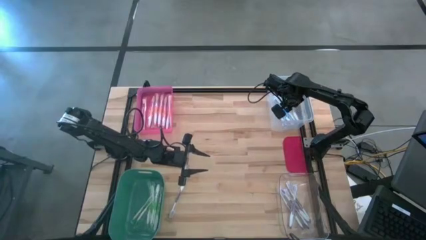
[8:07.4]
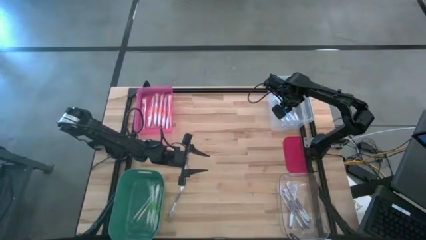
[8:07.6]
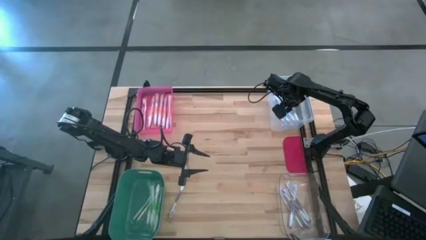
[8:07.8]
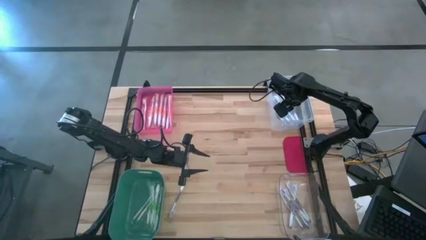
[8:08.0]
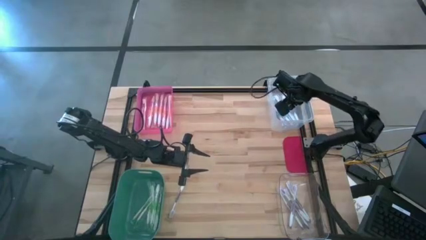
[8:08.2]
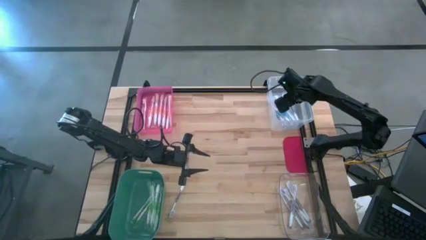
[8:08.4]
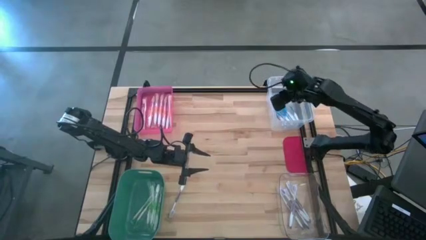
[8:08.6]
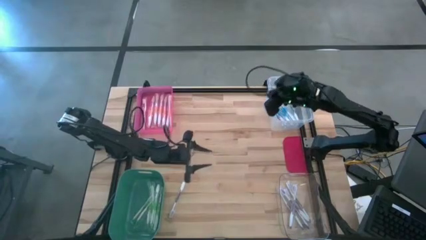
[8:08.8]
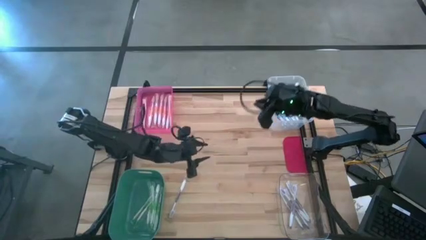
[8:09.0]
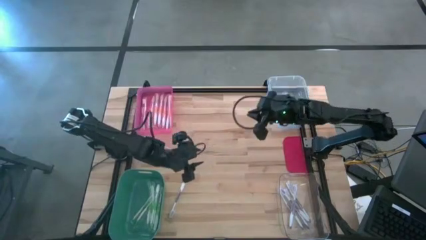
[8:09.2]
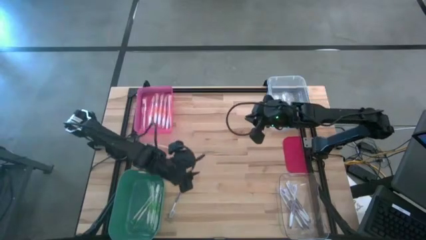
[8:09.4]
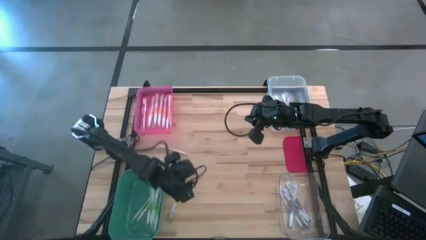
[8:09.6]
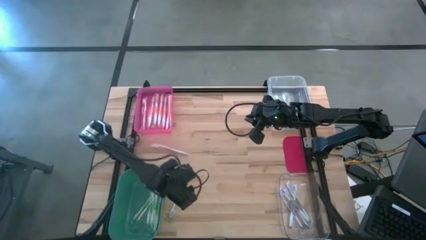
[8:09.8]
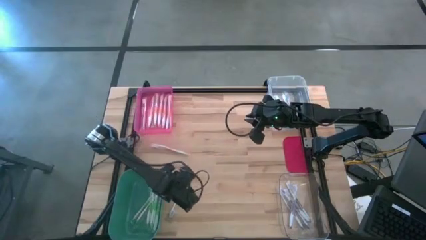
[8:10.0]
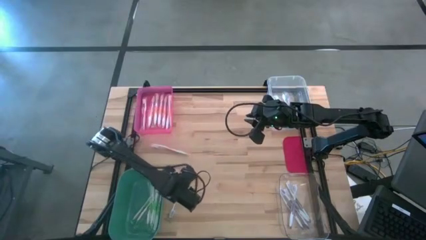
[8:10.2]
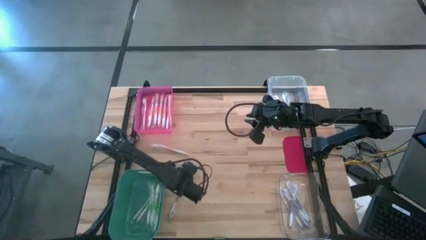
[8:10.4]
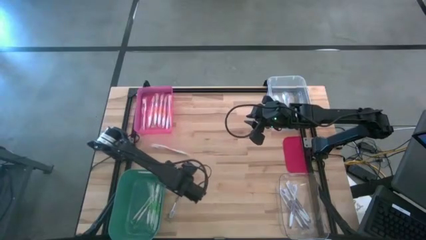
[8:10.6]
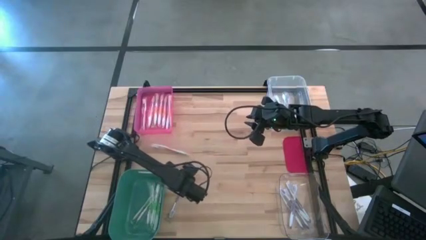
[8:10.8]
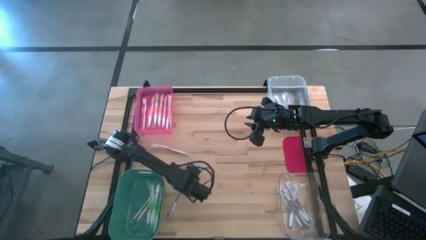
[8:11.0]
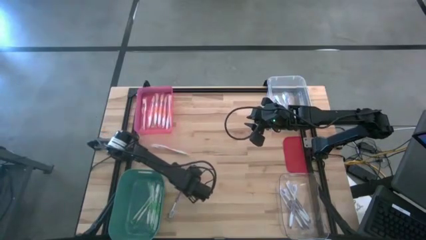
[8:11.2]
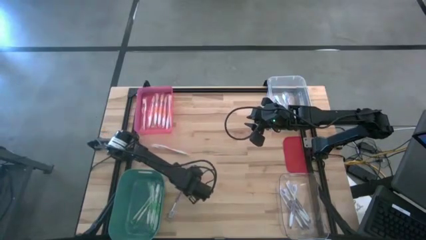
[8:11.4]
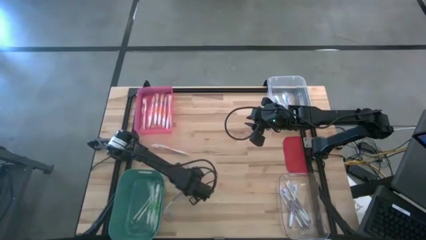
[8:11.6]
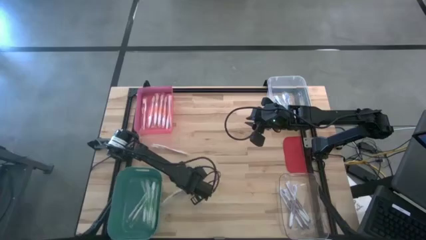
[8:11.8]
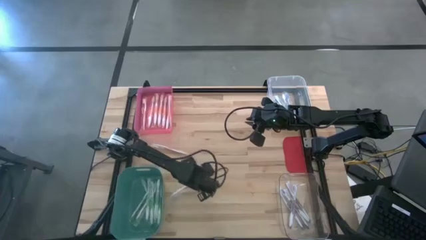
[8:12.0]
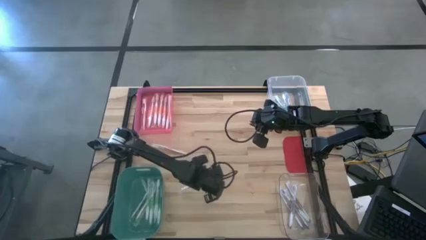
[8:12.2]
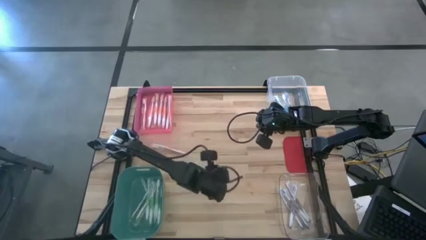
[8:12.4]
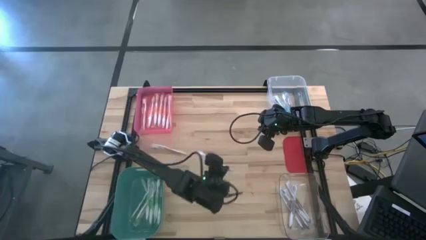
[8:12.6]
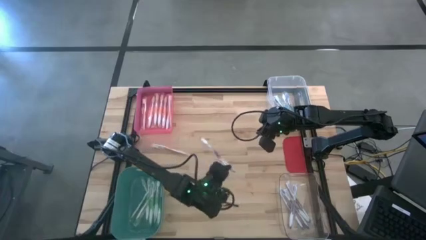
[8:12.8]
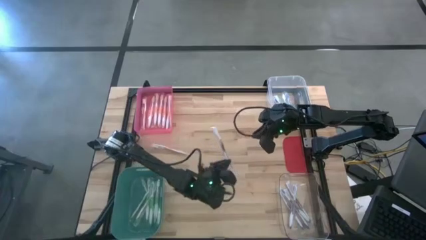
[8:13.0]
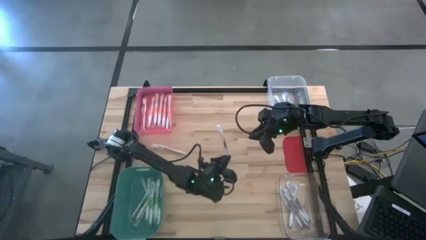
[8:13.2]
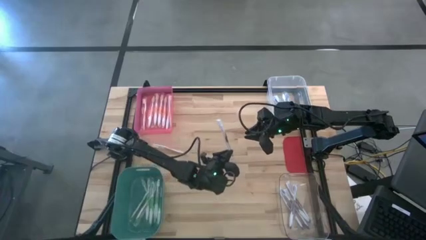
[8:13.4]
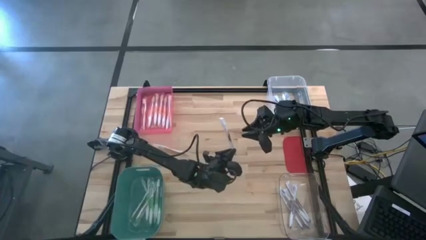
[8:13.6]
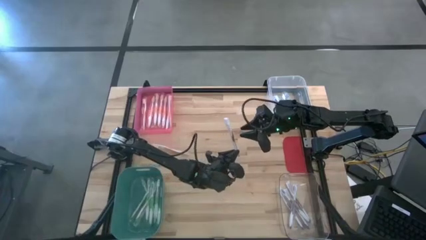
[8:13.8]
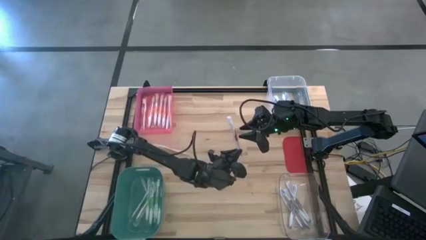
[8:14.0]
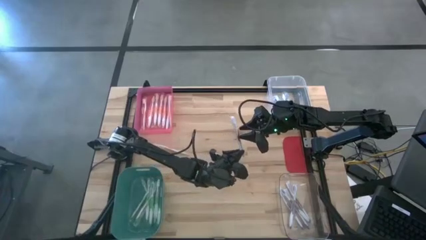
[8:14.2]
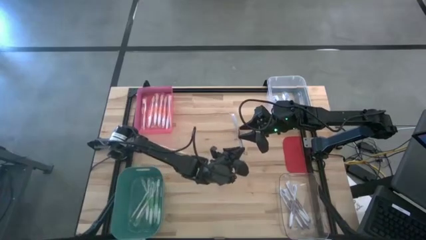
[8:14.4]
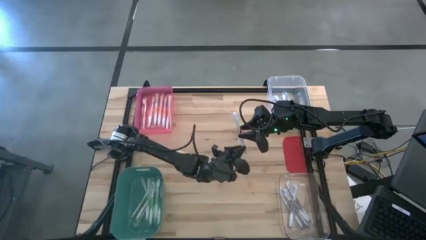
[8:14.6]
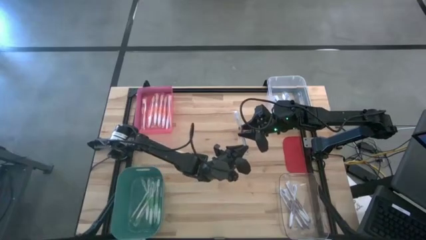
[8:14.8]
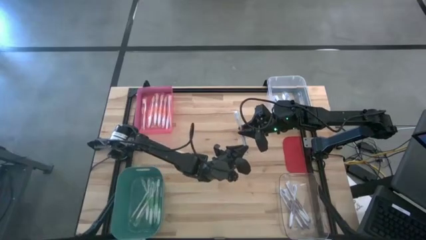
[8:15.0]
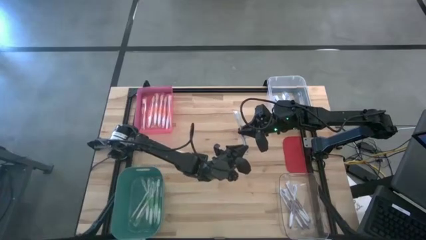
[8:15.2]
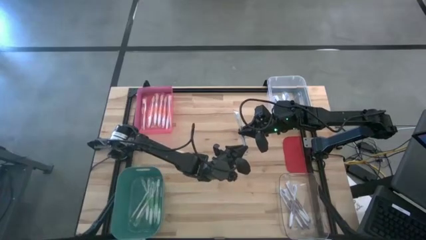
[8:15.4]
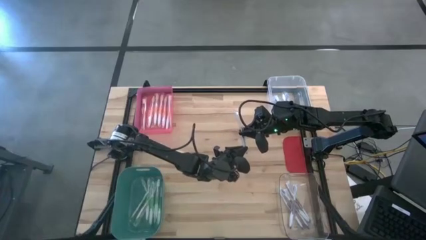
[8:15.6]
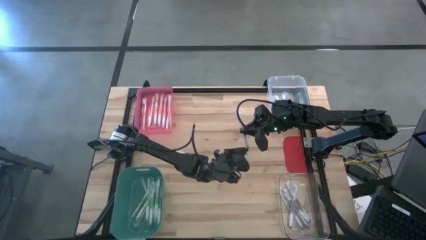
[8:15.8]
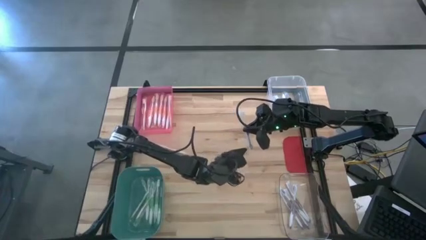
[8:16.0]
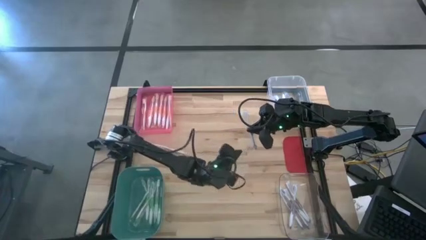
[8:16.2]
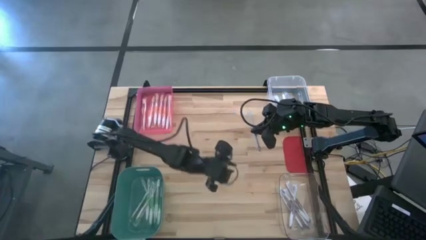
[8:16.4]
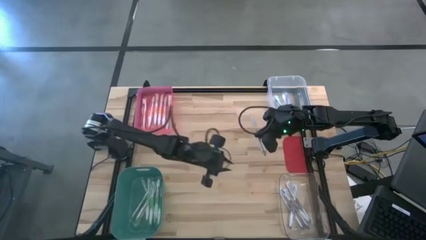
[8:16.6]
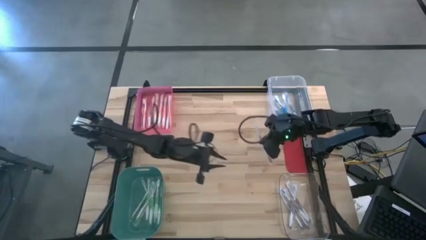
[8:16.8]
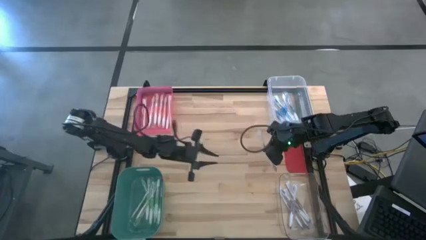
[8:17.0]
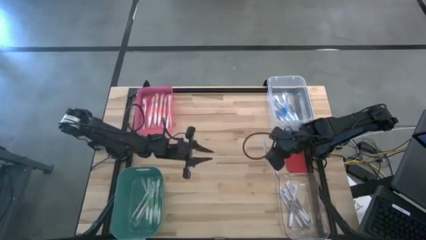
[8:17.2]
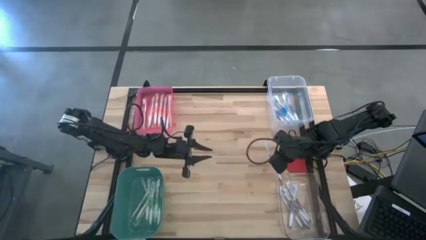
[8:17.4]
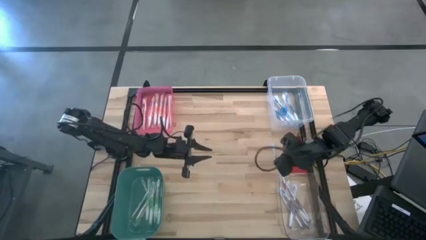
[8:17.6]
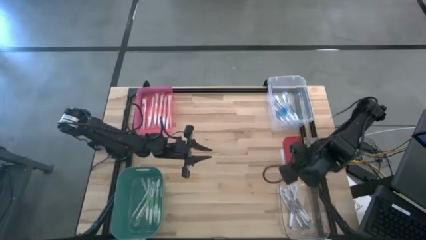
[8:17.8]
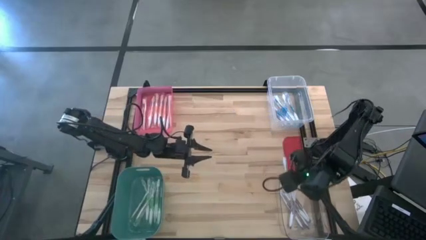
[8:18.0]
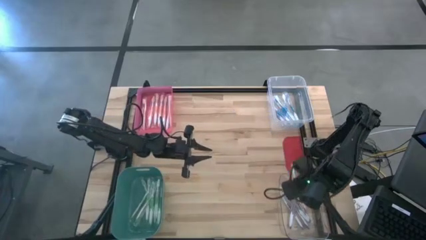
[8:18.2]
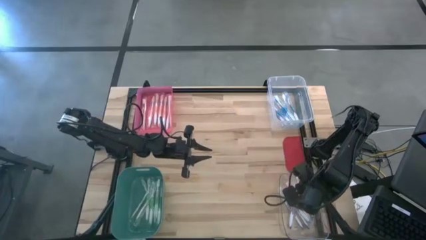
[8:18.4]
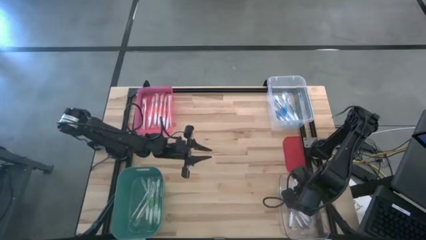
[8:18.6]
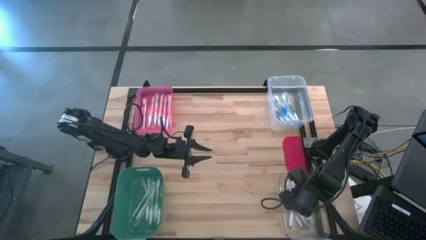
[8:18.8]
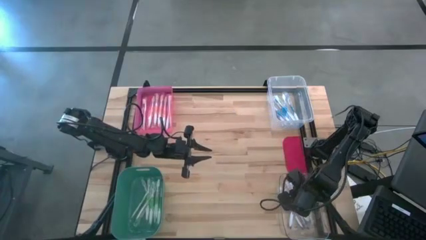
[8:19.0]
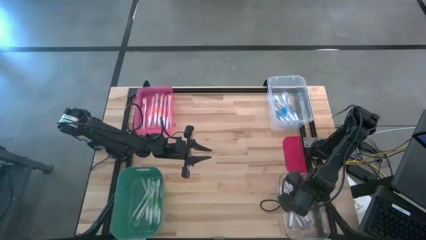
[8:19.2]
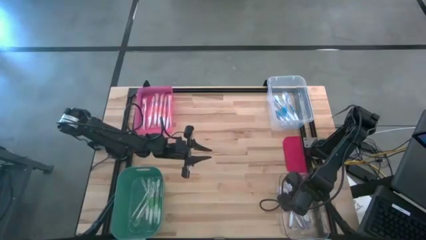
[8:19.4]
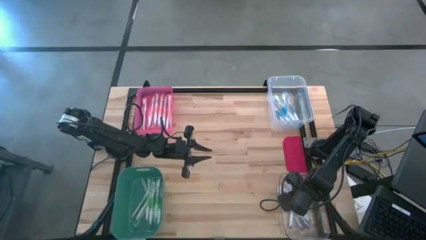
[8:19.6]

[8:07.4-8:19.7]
Task: Pick & Place Toothbrushes
Put the violet toothbrush into the bottom transparent bin

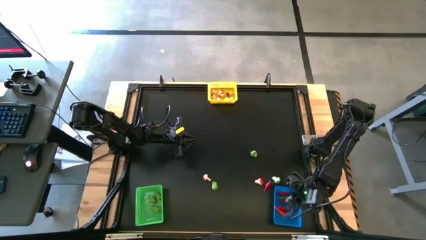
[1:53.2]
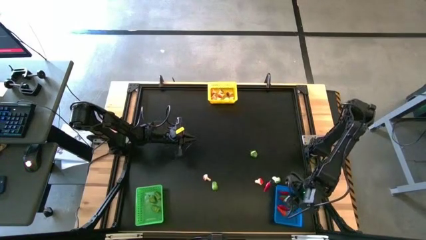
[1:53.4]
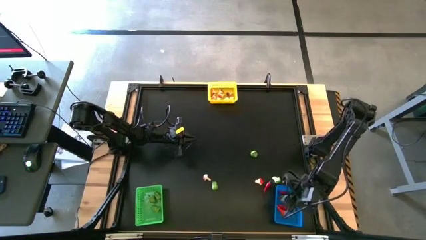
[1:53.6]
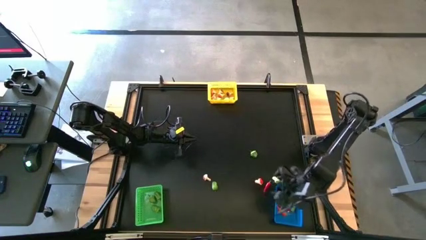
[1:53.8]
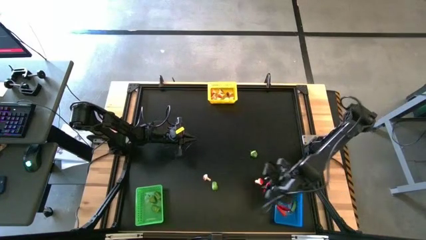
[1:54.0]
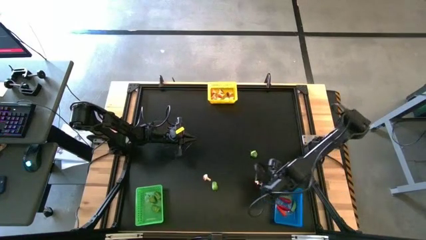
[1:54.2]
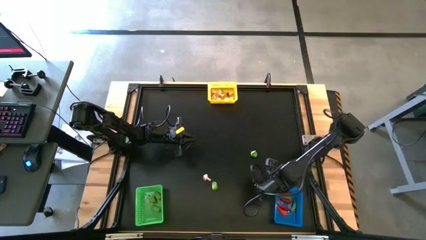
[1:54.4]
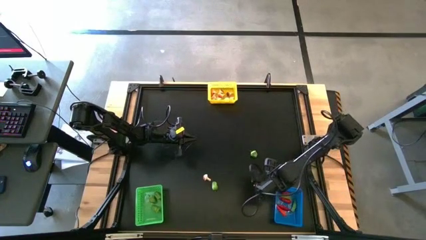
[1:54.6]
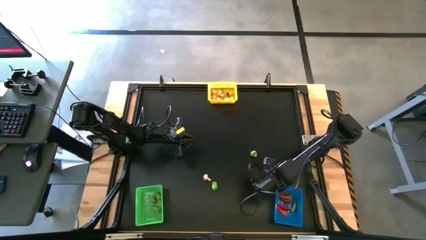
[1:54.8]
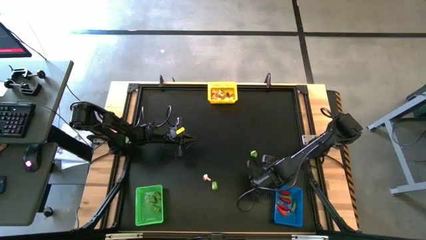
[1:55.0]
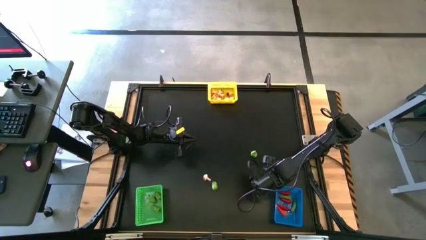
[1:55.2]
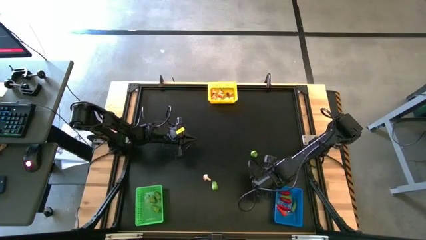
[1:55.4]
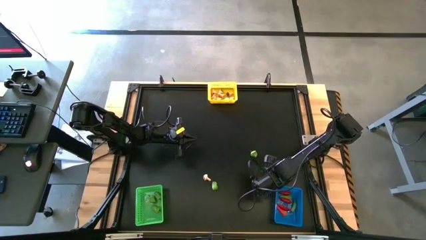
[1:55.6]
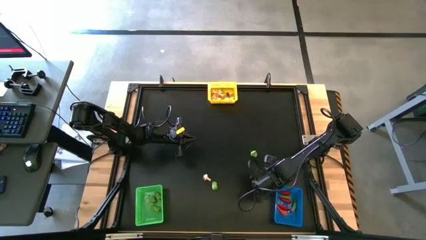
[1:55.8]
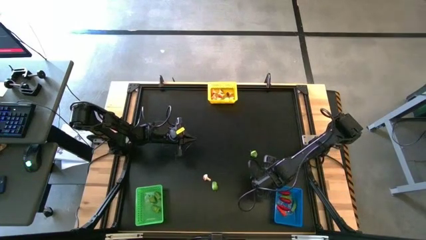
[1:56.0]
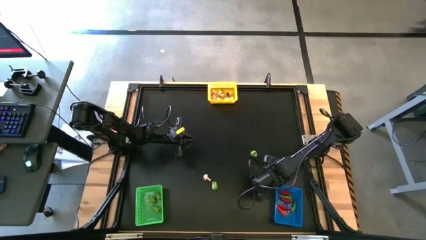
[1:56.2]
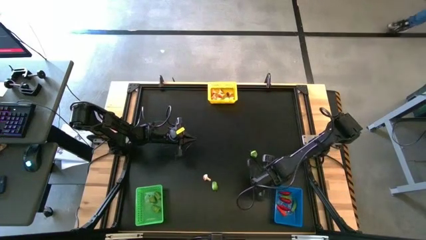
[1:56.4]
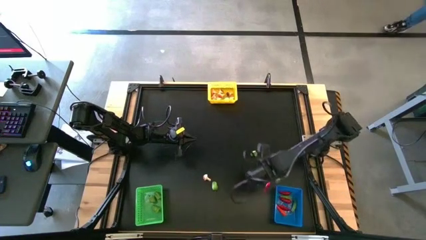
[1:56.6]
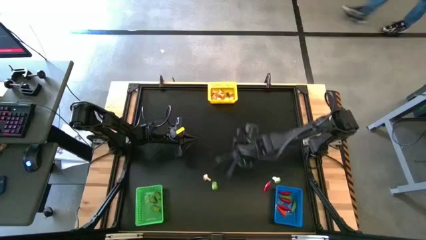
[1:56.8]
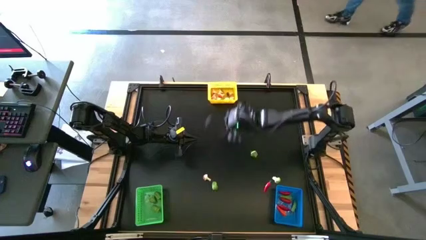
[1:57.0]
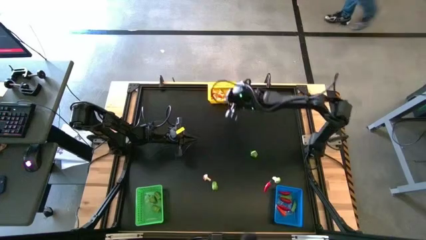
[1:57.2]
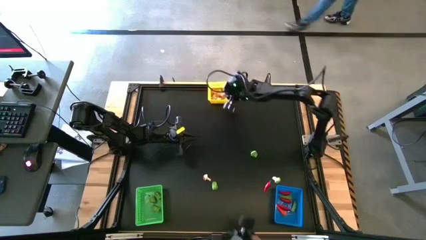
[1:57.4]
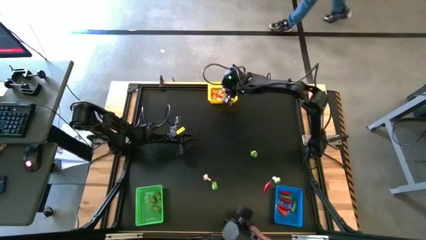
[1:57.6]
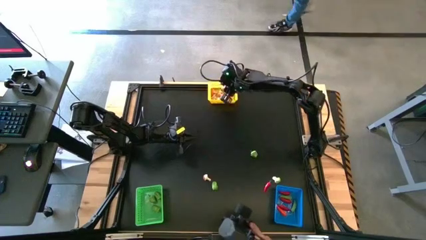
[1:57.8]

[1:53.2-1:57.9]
Task: Sort produce into baskets
Put the right red mushroom into the yellow bin
